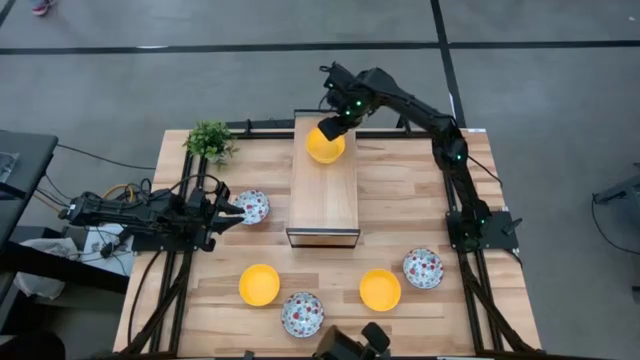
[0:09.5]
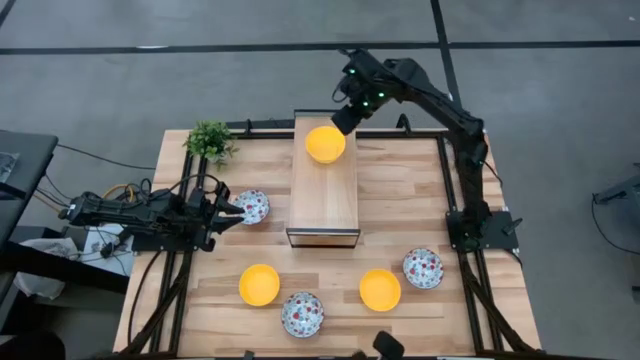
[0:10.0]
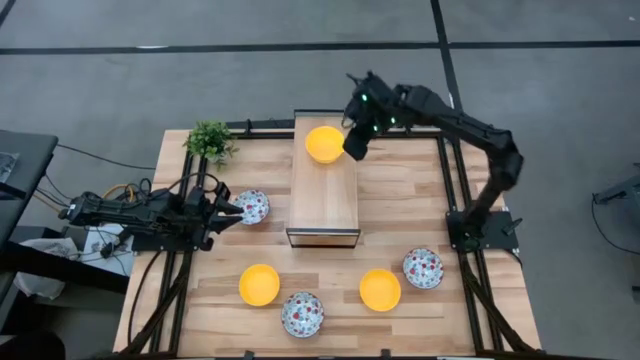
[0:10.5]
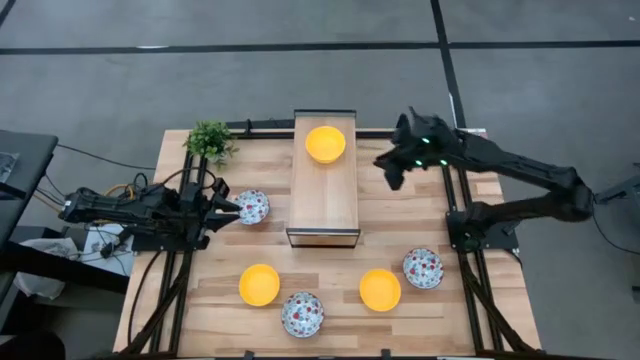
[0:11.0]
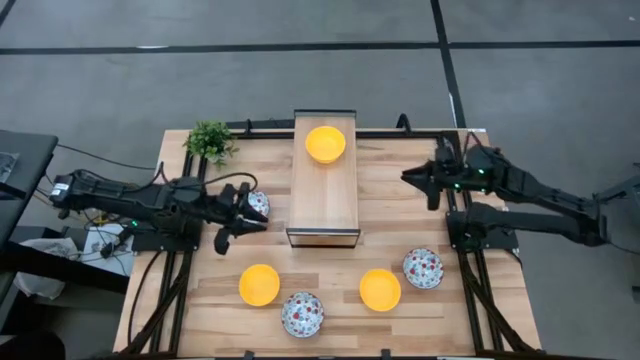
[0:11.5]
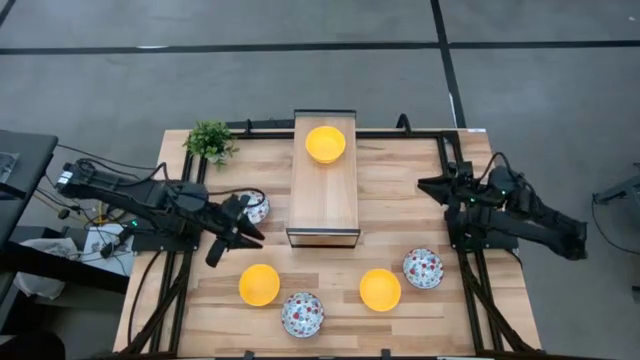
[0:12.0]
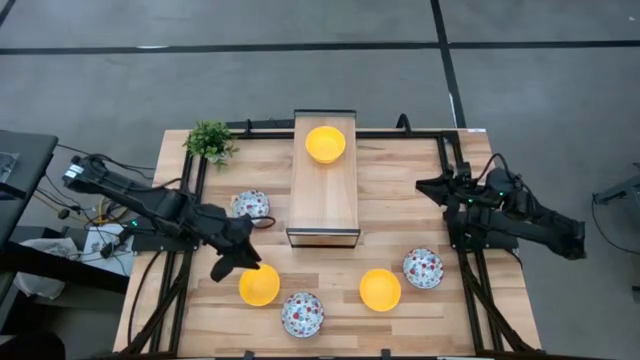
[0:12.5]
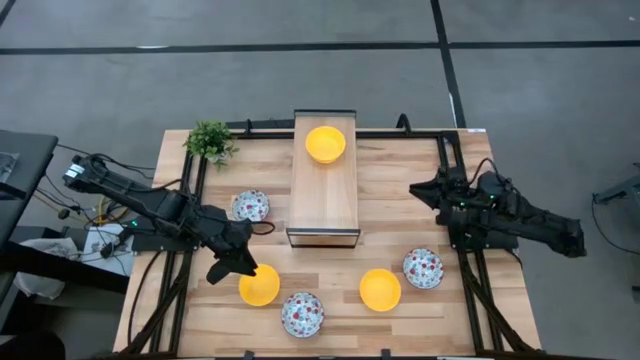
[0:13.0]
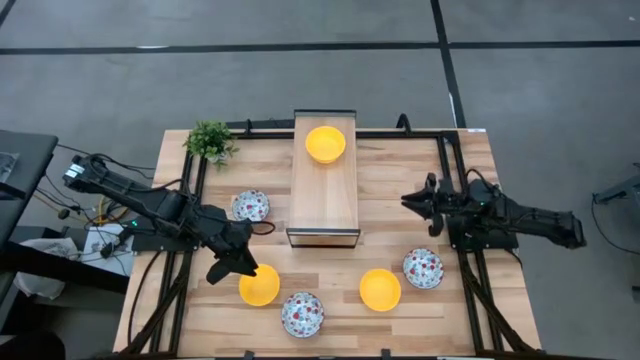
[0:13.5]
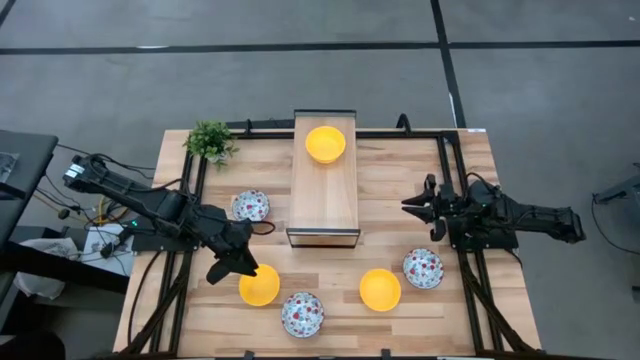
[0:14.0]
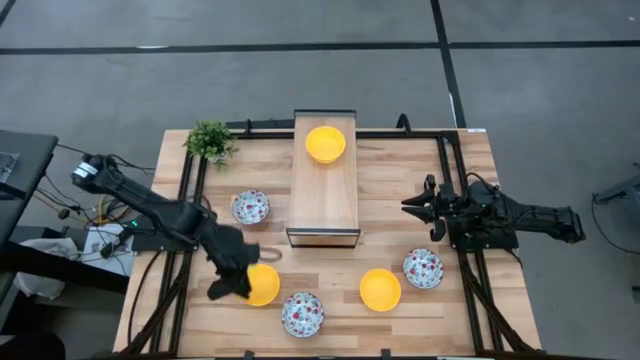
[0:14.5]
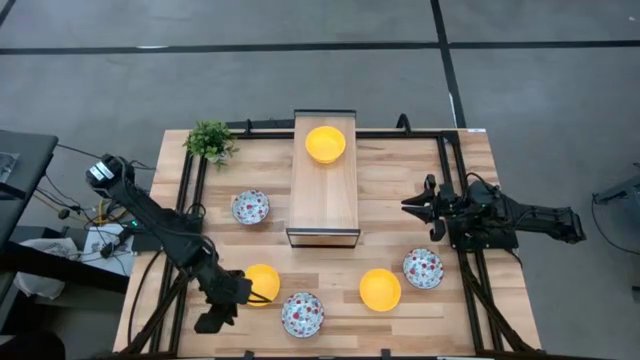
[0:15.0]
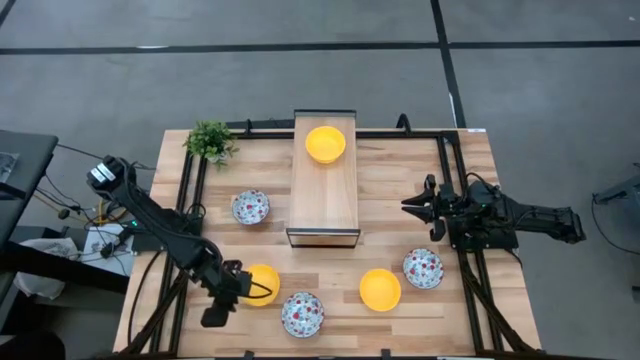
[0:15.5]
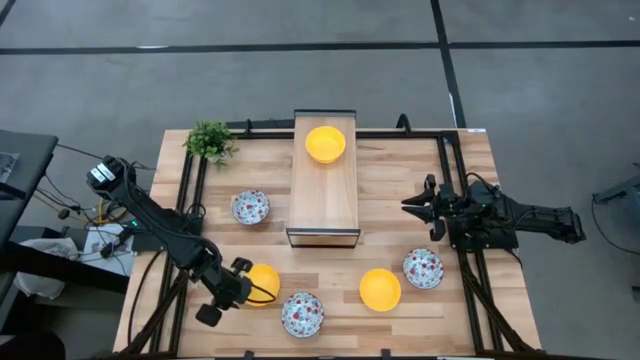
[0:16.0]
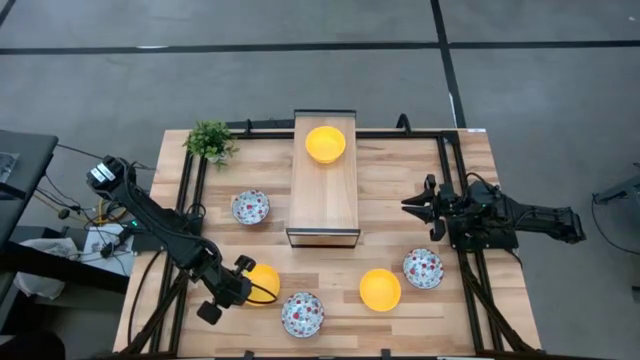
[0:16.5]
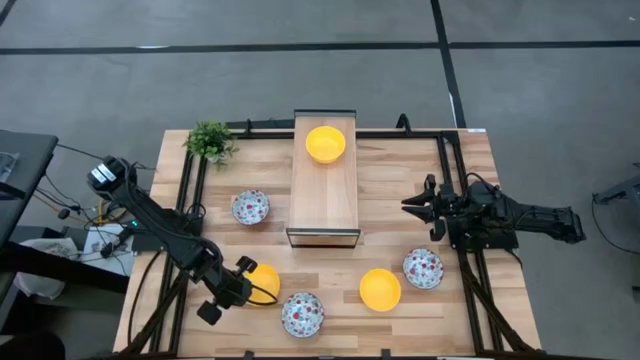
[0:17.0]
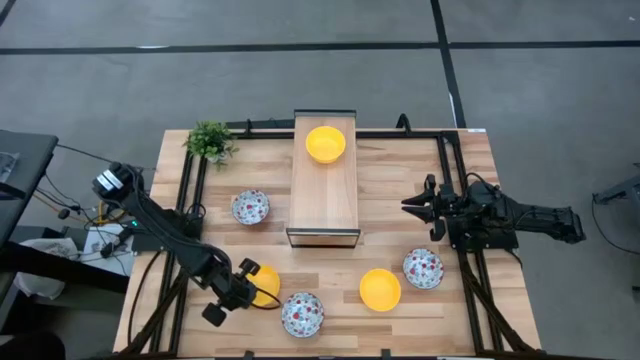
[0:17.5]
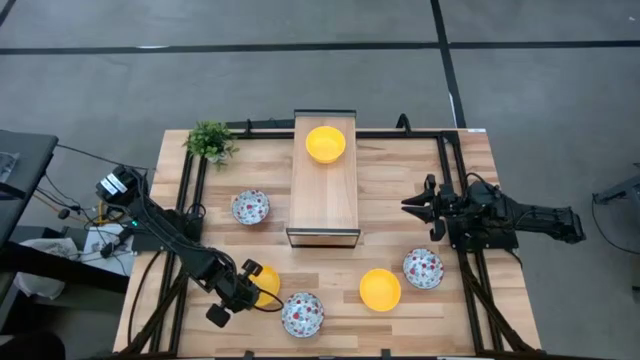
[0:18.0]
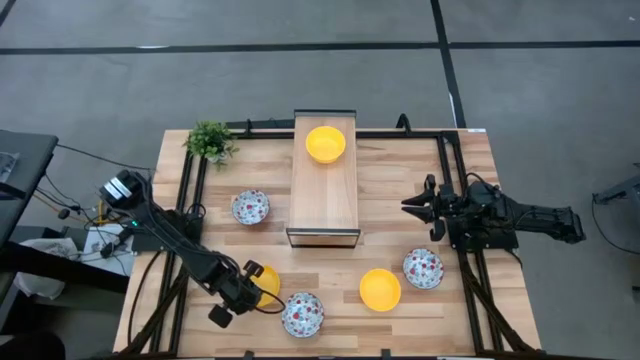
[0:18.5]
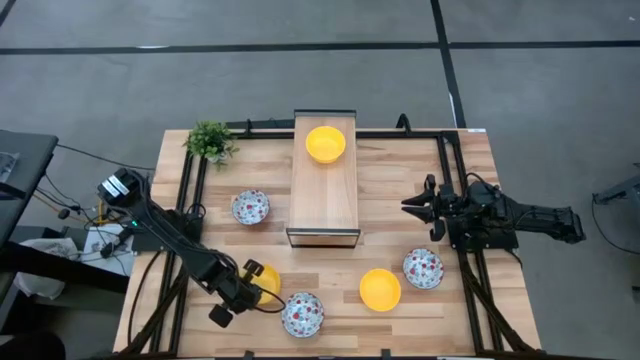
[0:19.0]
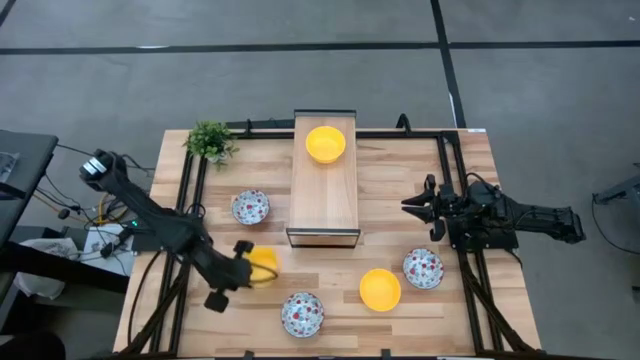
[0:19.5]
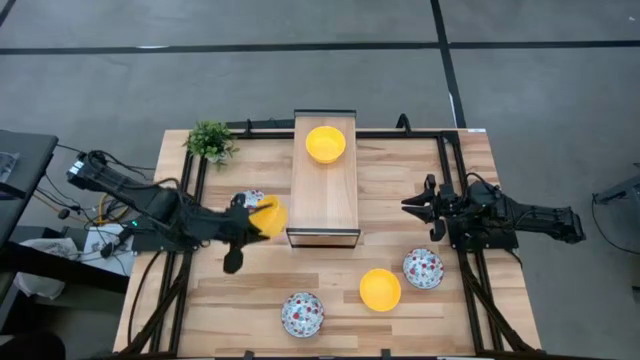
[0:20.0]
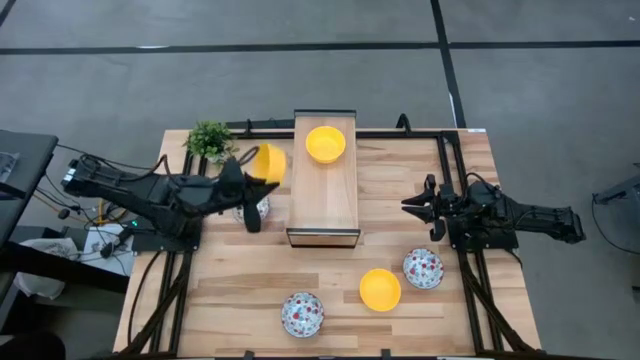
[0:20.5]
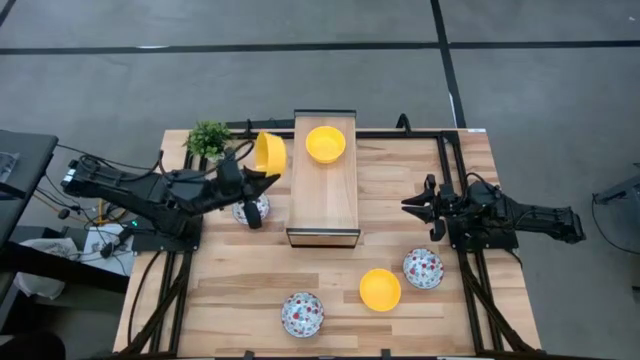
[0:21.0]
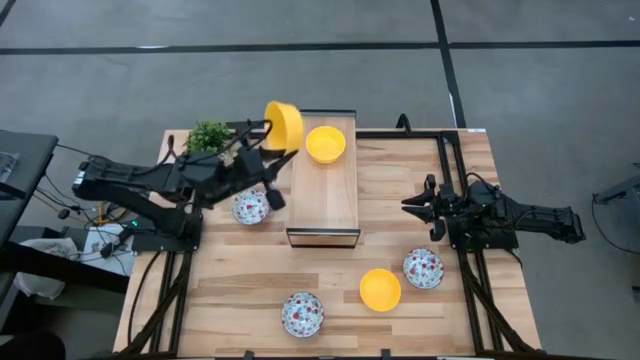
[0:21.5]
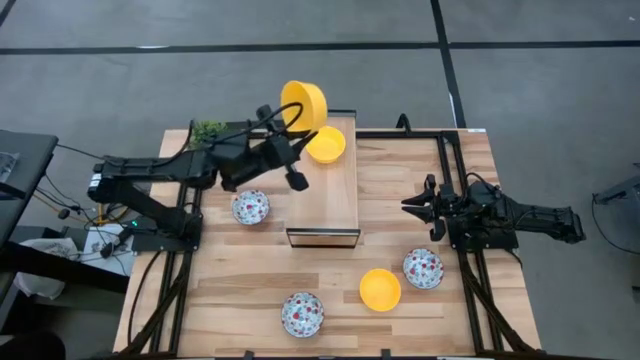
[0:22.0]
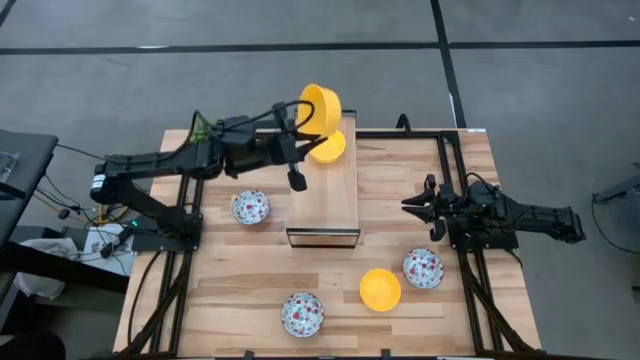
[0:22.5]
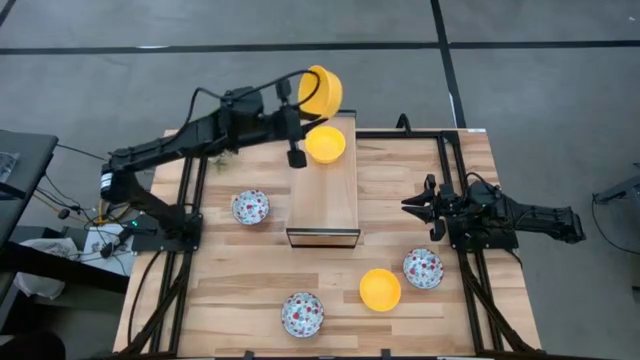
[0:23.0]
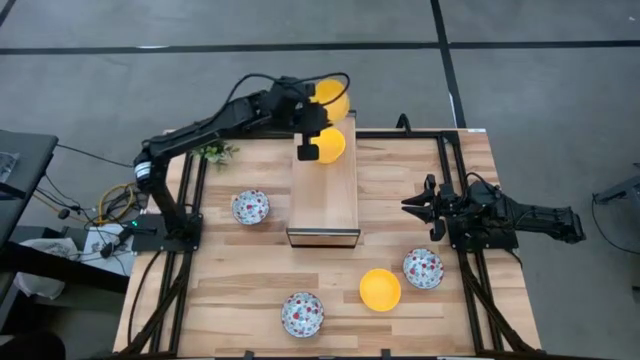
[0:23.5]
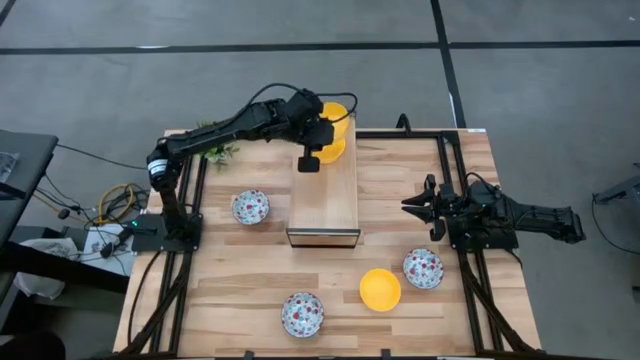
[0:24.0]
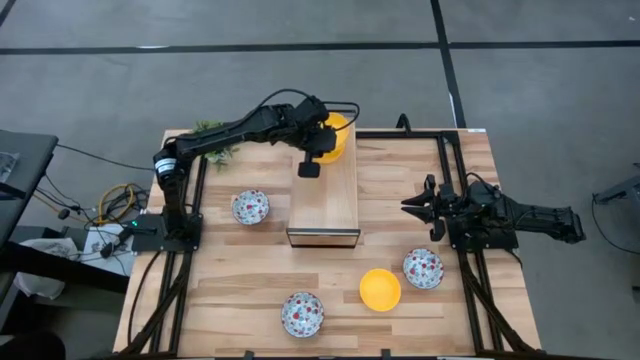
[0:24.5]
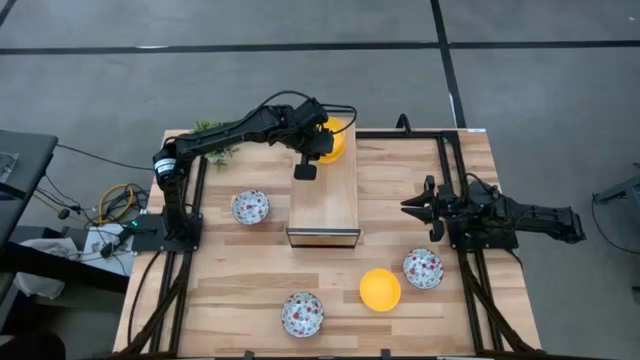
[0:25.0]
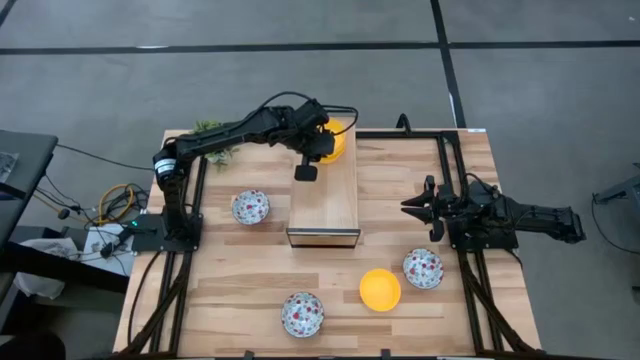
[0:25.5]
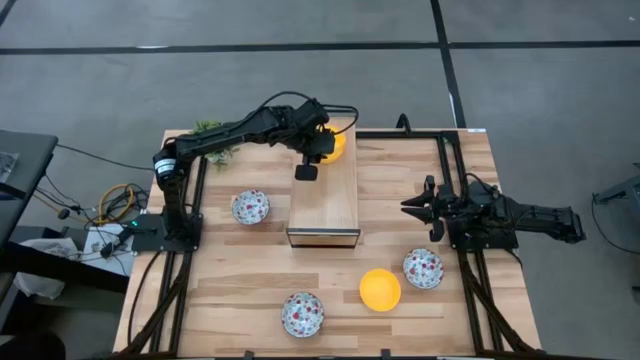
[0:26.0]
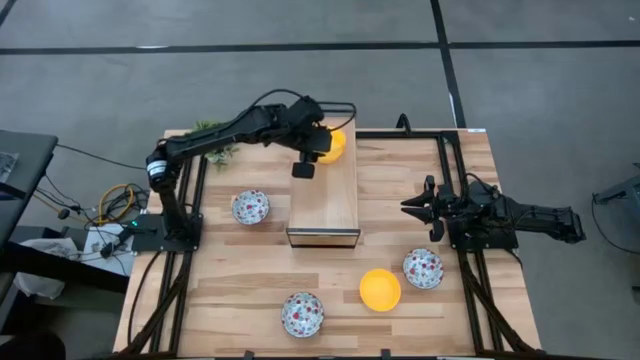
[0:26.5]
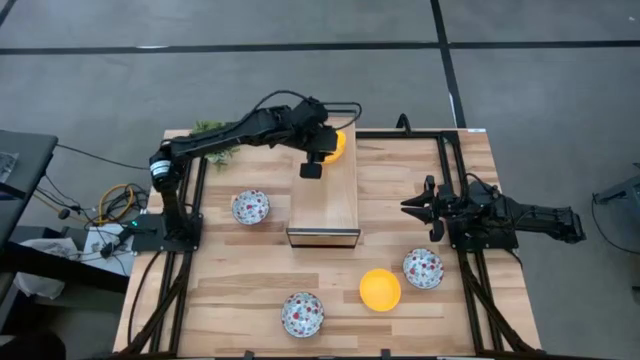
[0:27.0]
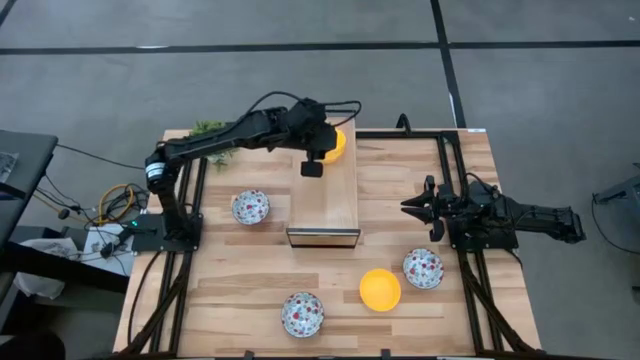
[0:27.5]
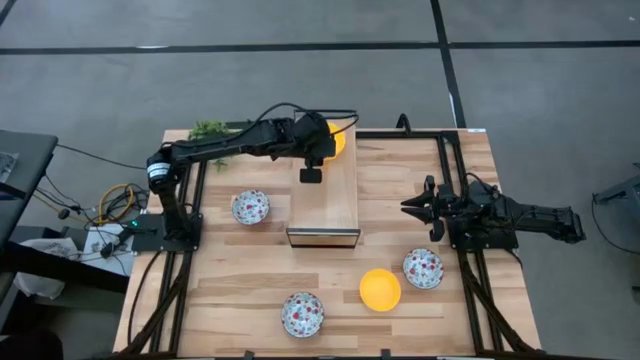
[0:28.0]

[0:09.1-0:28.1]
Task: Pick & Place Mini bowls
Stack the left yellow bowl on top of the yellow bowl on the shelf

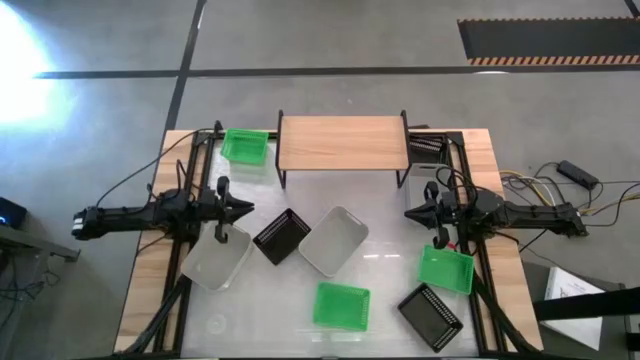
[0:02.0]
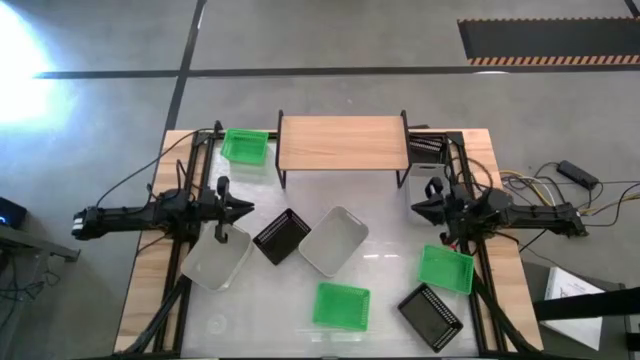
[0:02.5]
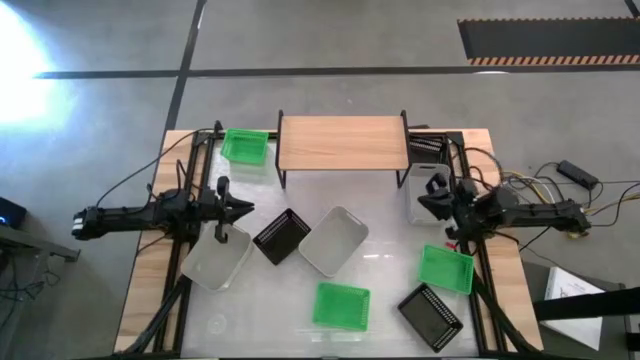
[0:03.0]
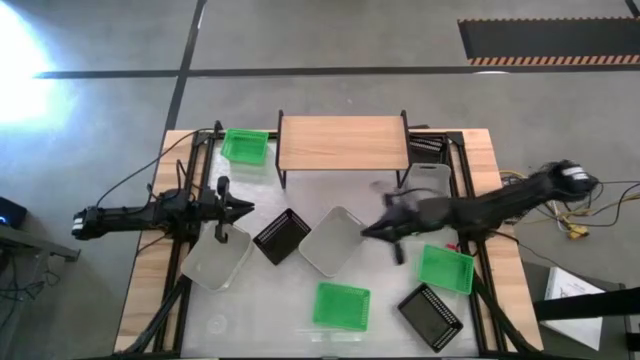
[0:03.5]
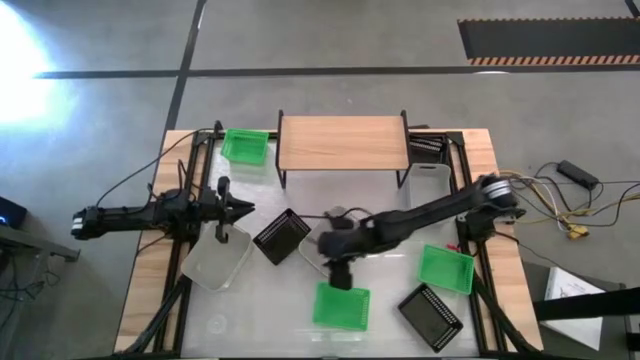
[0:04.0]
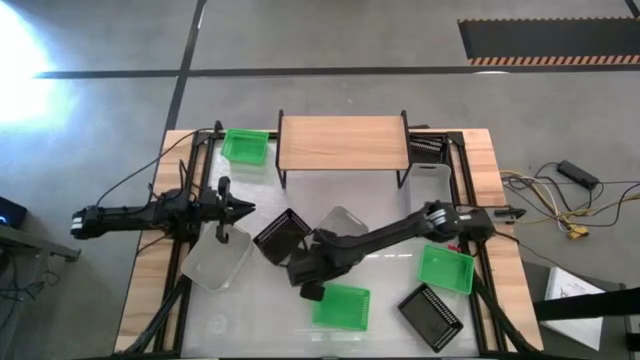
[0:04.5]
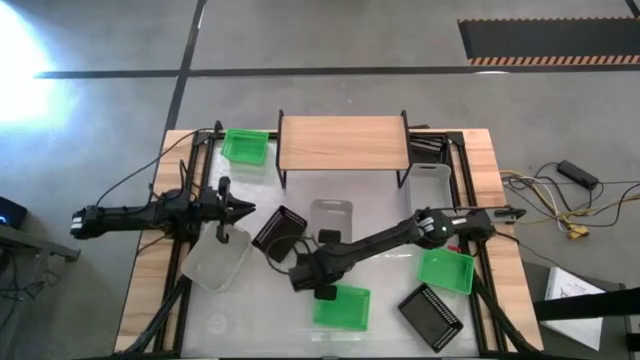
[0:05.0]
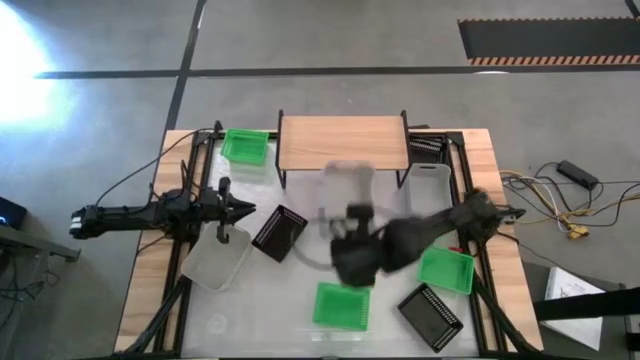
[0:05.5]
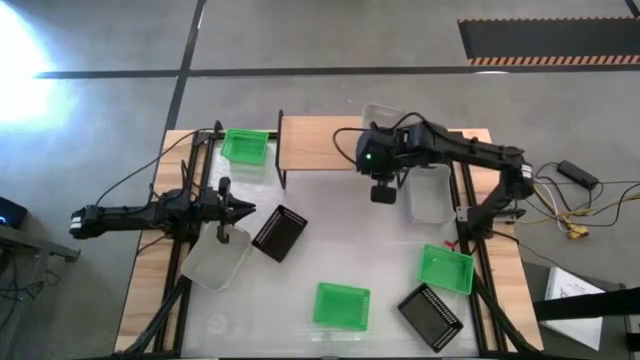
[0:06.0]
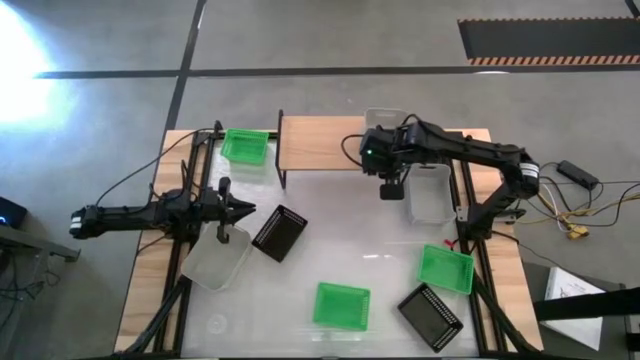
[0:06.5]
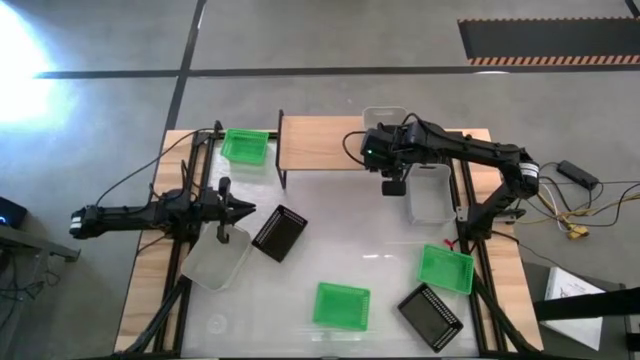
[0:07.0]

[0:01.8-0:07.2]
Task: Stack baskets on shelf by color
Put the middle white bin on the shelf
